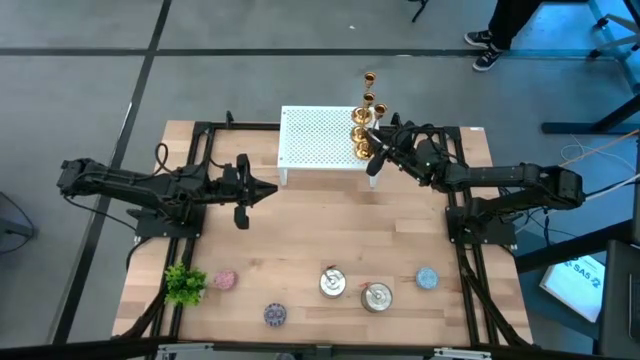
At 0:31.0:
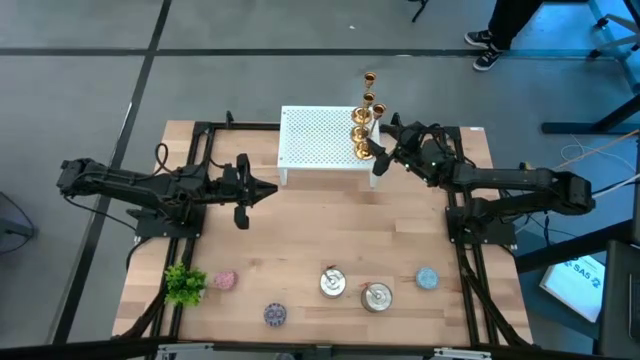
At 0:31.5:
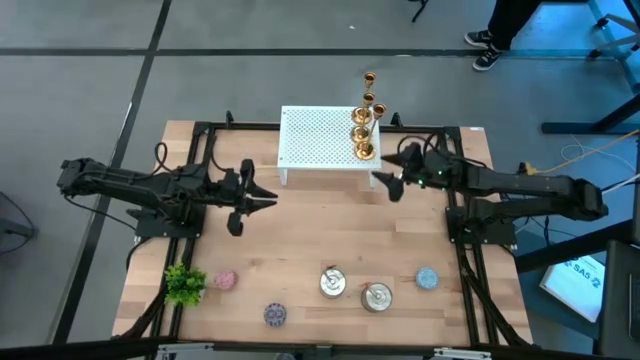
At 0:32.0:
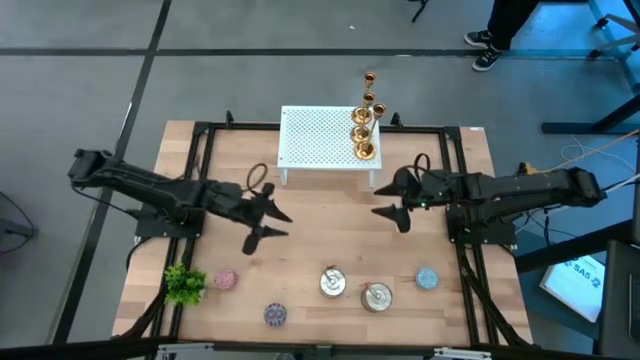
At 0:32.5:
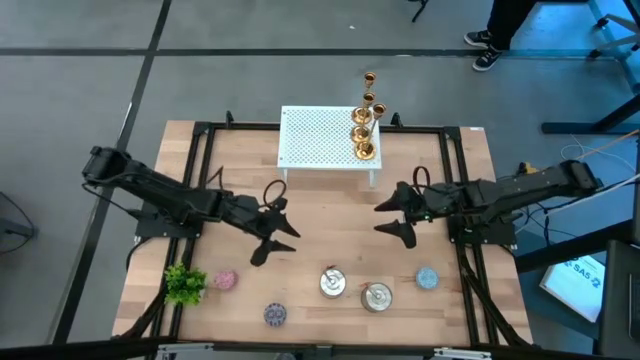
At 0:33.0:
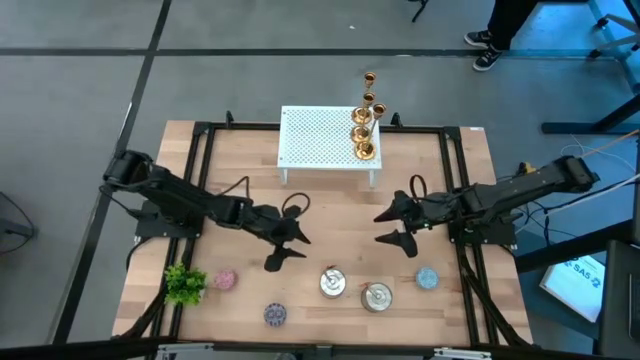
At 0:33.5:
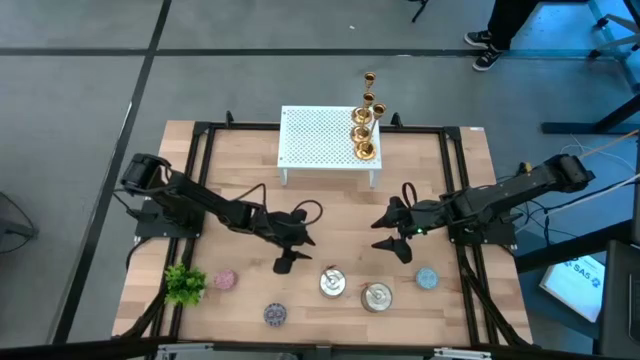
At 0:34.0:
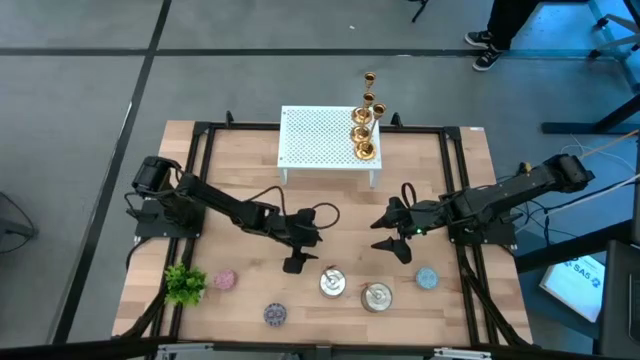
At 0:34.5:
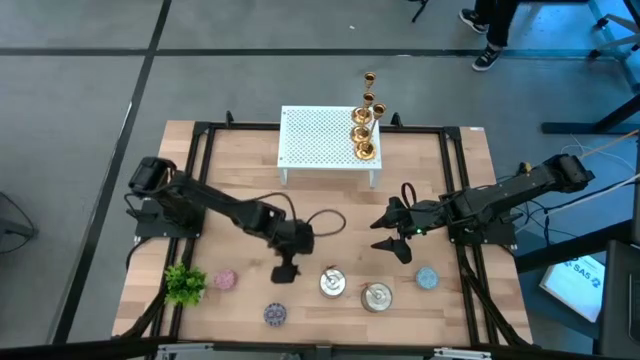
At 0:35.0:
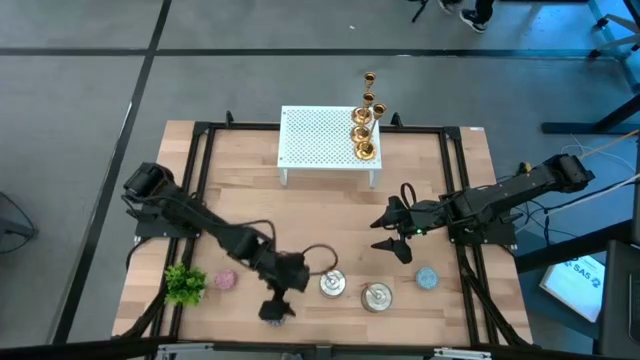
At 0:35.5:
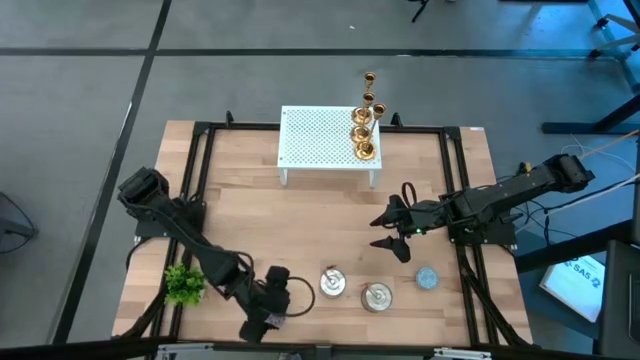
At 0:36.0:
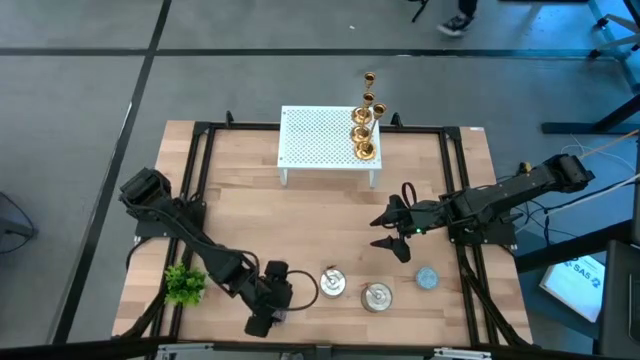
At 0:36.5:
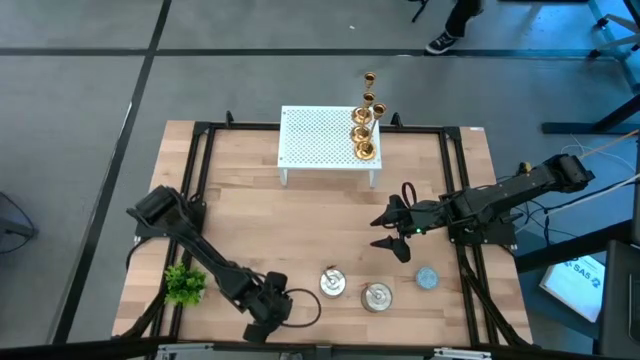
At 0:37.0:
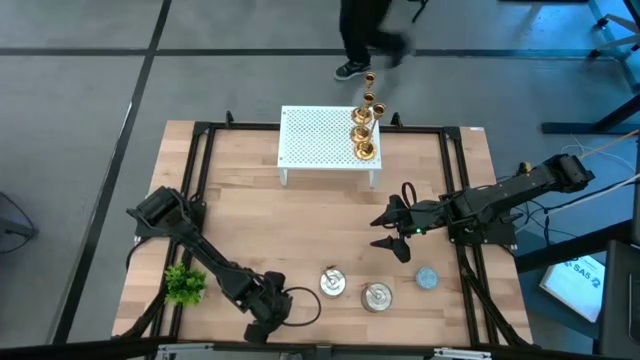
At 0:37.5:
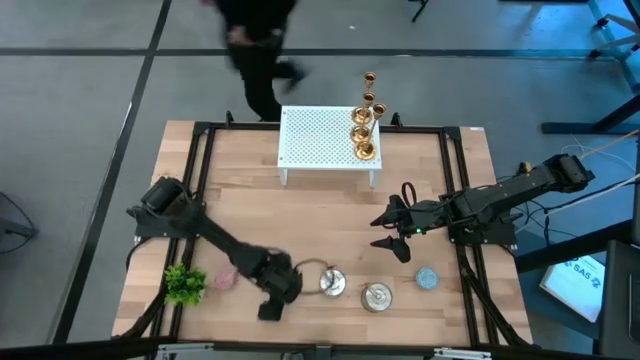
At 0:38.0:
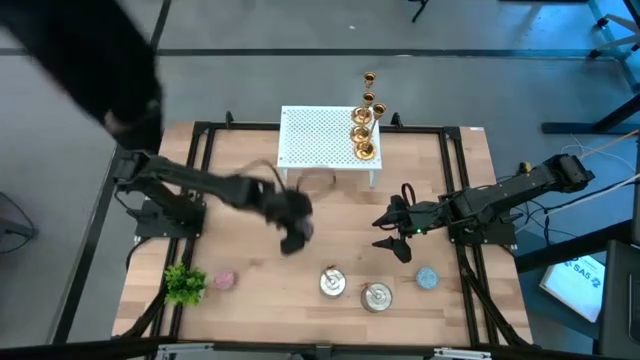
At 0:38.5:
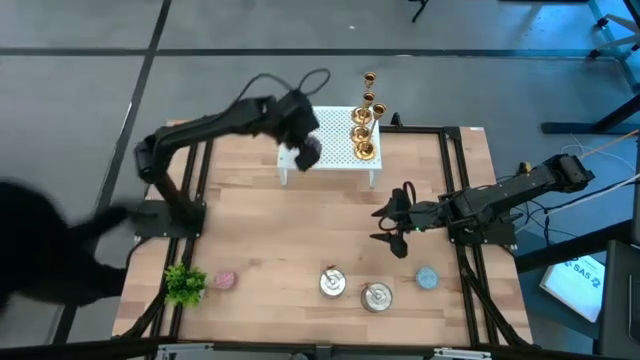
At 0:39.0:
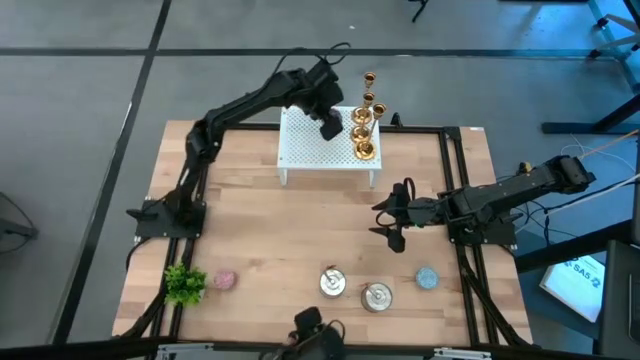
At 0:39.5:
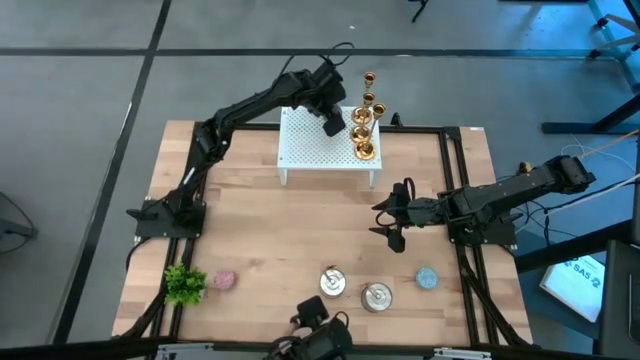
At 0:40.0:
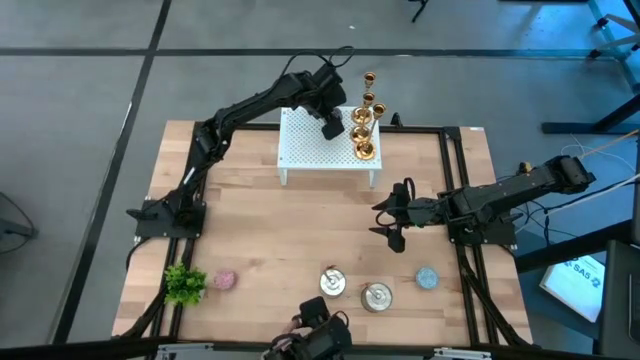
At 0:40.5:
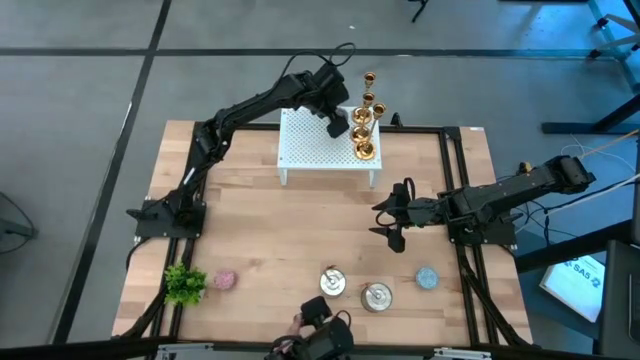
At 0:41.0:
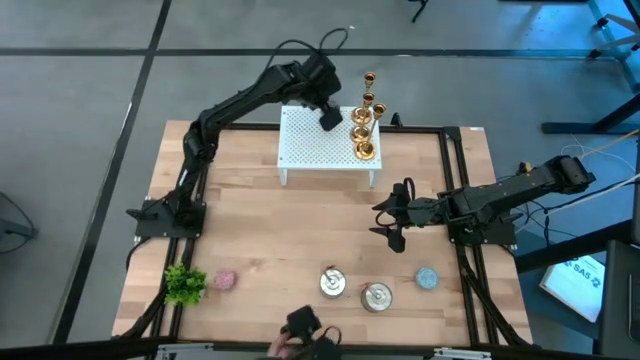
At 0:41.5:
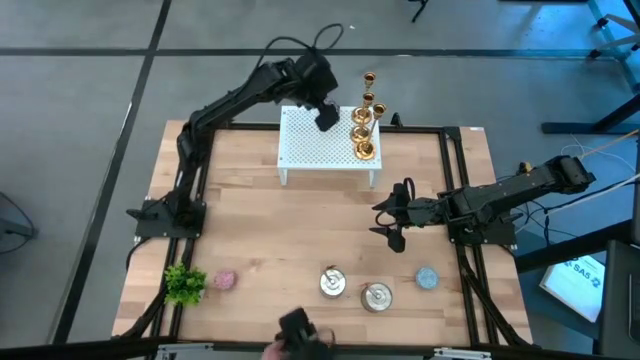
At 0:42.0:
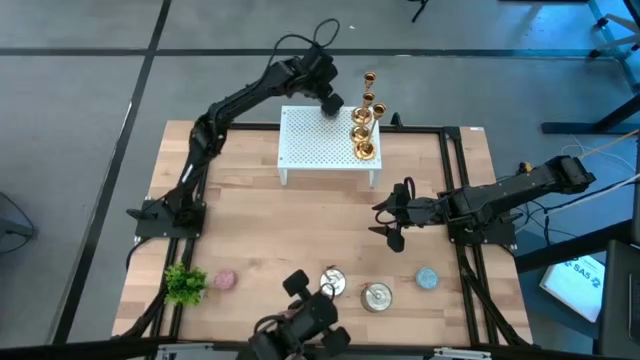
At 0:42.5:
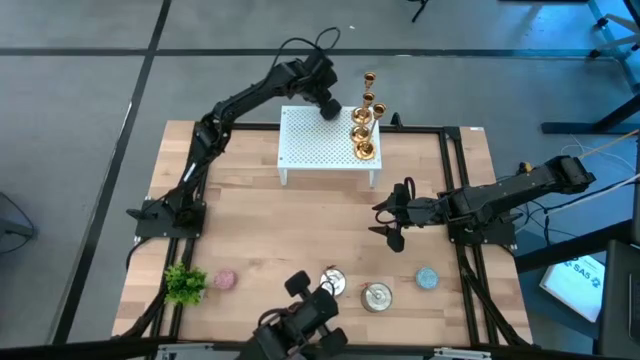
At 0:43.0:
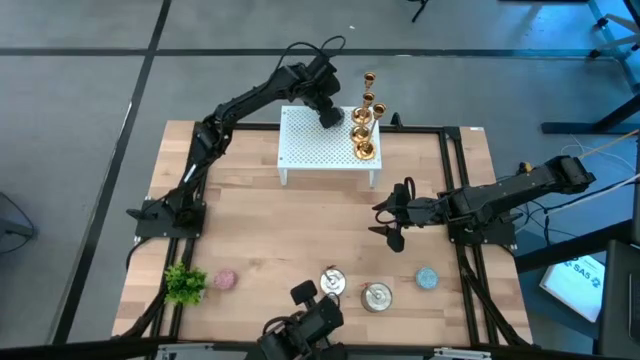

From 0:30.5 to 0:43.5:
Task: Pick & Place candle stick holders
Put the red patterned scented candle on the shelf

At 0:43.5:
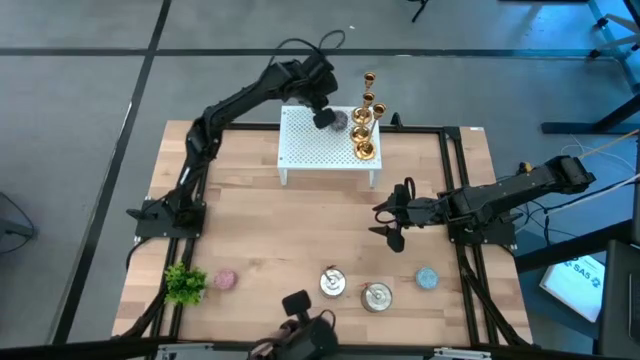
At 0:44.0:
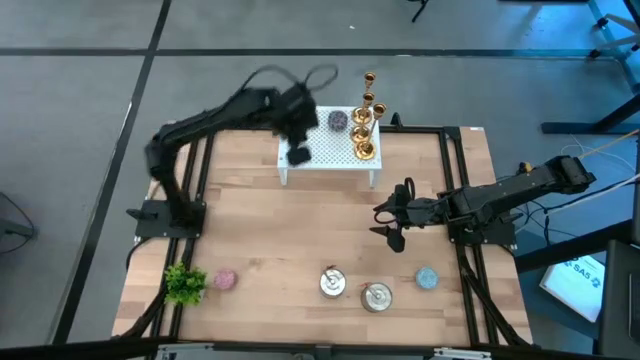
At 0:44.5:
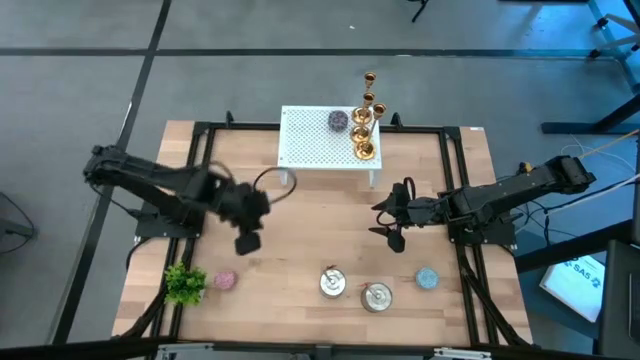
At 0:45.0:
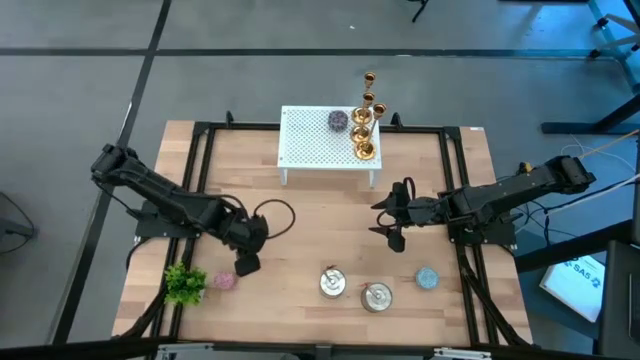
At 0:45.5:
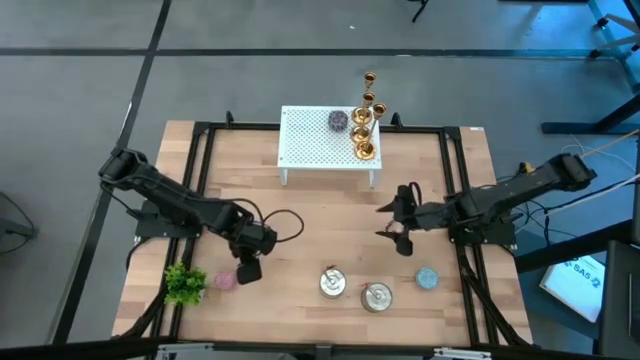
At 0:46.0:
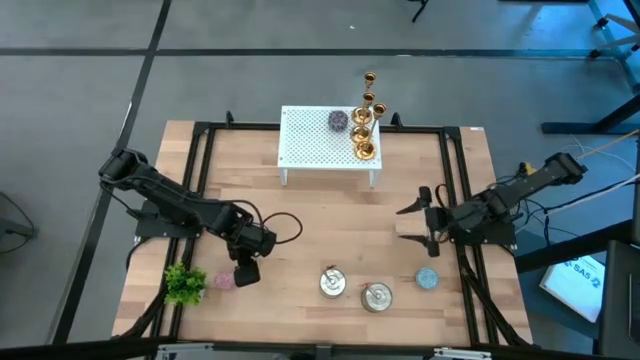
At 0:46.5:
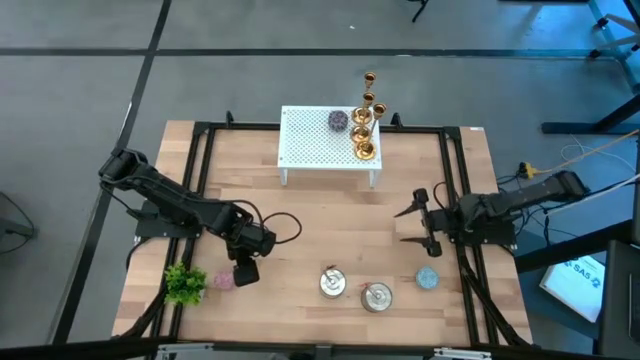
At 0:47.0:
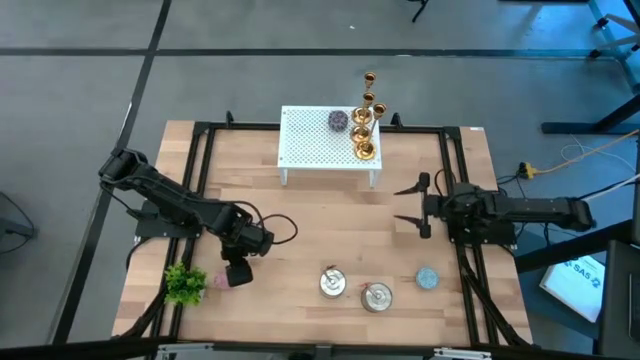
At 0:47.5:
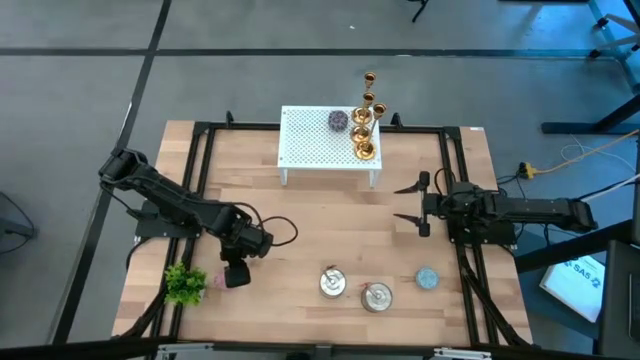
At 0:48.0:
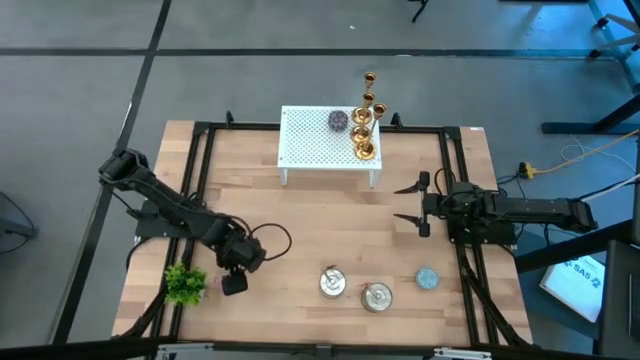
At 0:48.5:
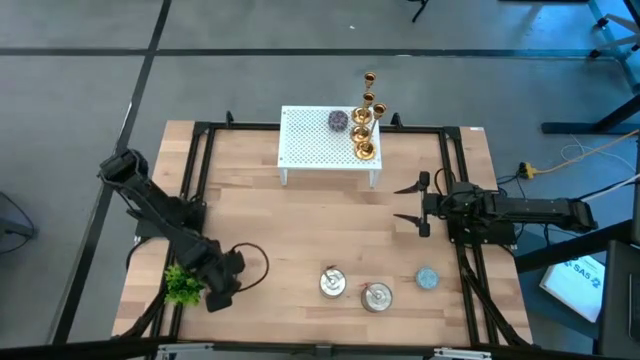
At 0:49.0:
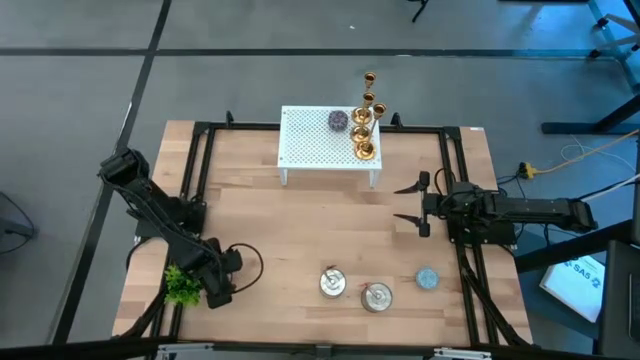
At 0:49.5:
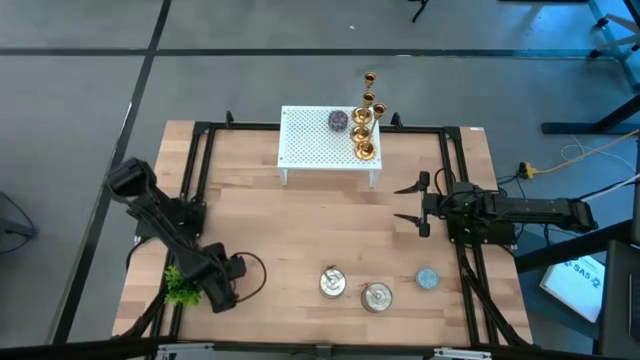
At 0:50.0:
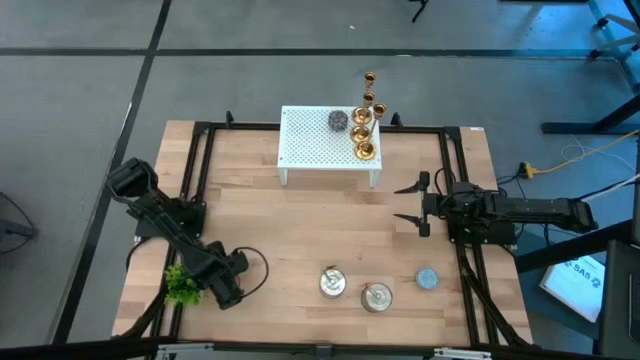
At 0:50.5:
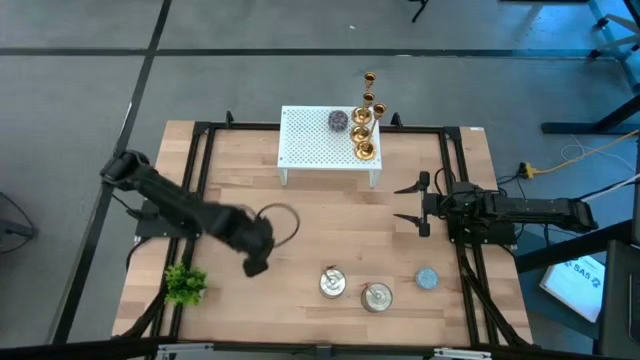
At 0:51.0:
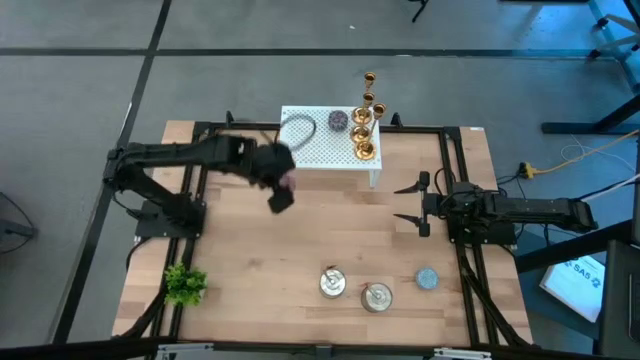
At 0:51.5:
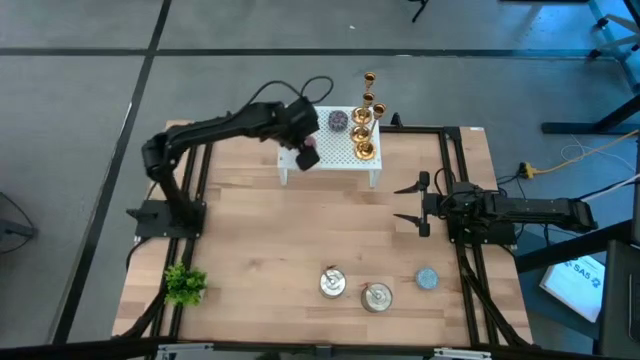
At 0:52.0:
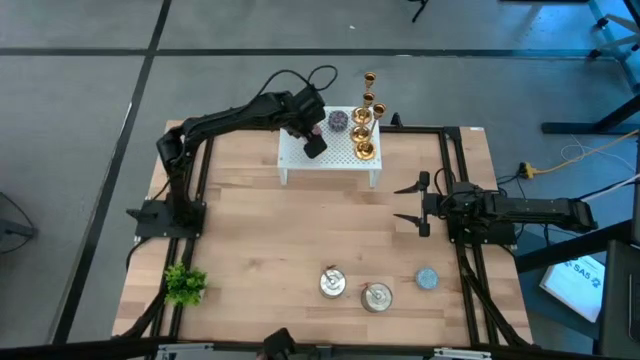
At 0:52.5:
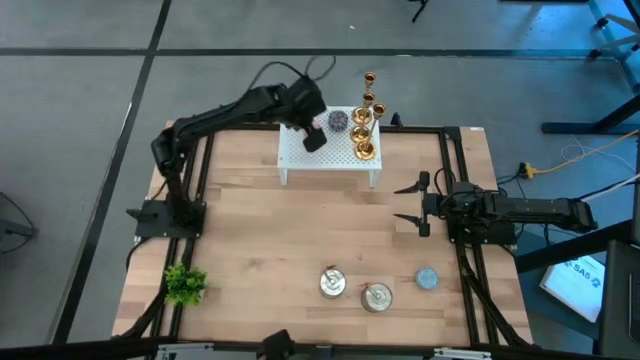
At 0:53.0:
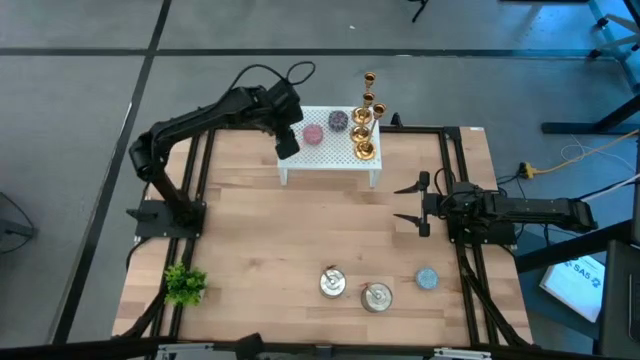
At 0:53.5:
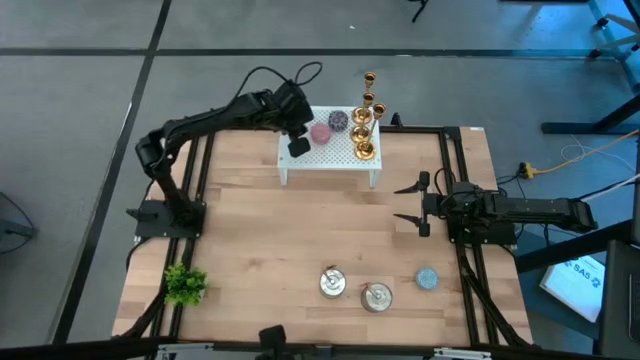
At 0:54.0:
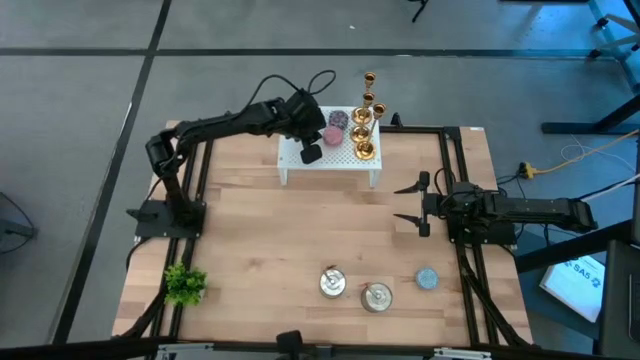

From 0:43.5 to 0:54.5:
Put the pink patterned scented candle on the shelf and align it with the red patterned scented candle
